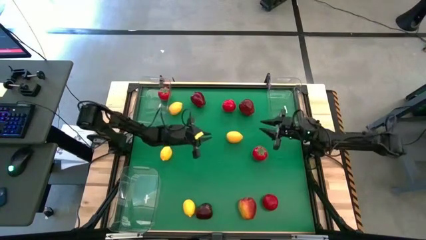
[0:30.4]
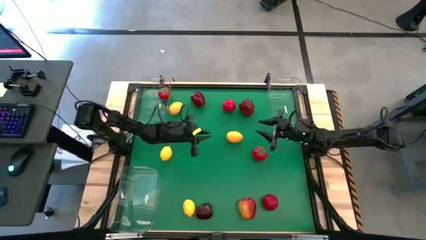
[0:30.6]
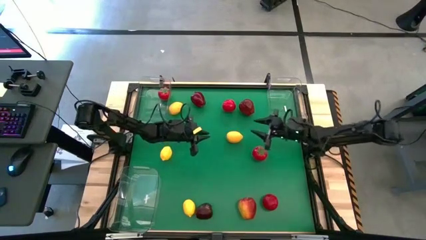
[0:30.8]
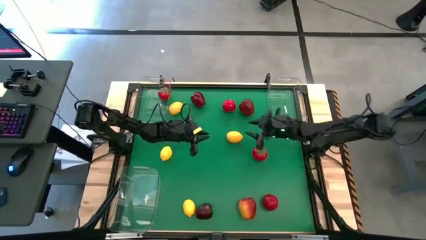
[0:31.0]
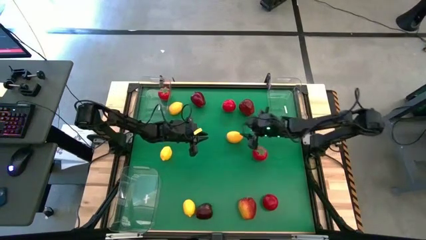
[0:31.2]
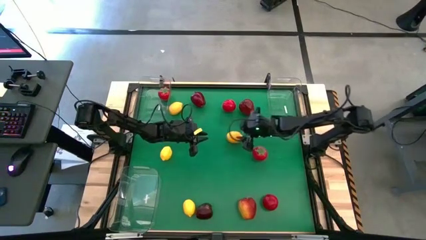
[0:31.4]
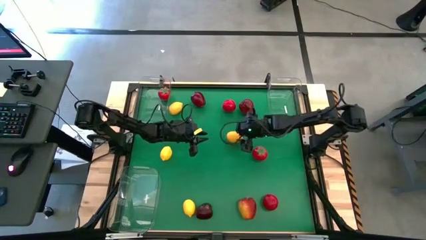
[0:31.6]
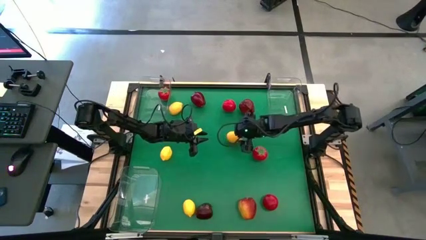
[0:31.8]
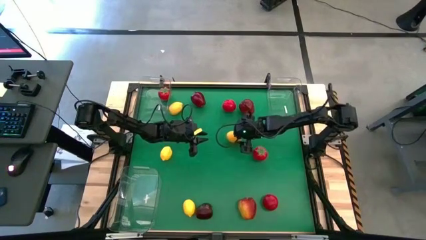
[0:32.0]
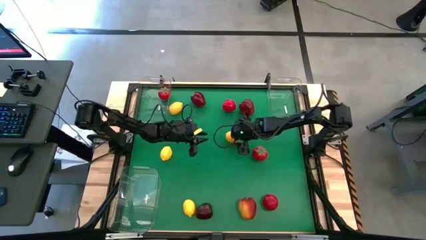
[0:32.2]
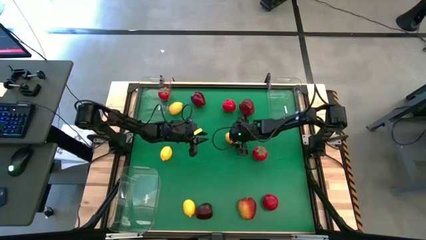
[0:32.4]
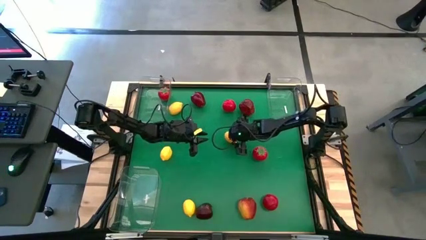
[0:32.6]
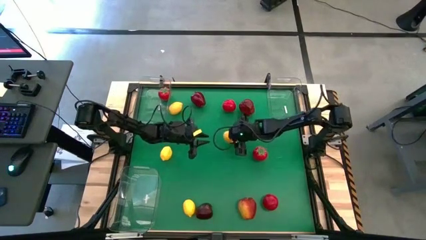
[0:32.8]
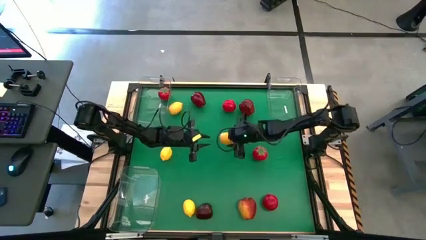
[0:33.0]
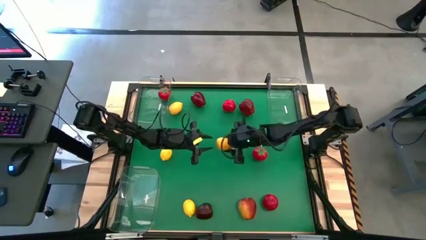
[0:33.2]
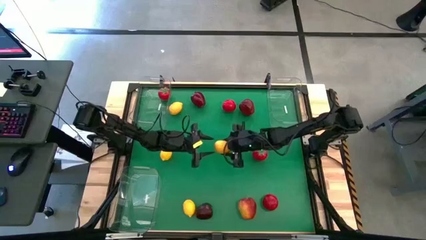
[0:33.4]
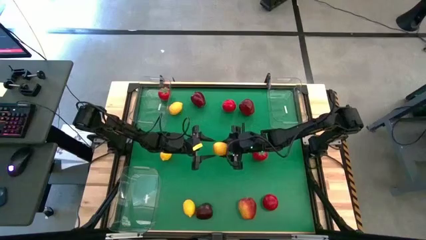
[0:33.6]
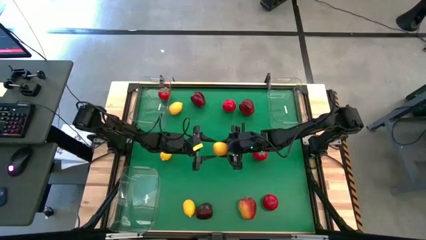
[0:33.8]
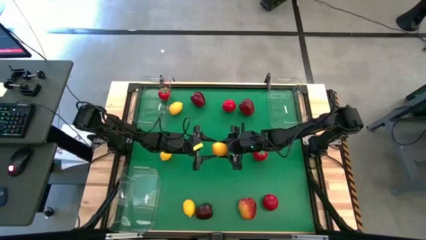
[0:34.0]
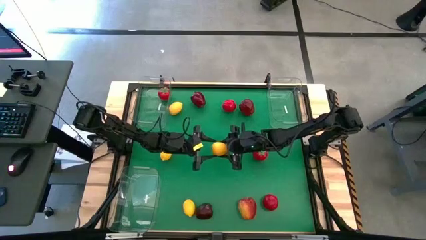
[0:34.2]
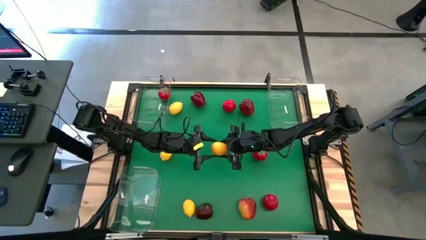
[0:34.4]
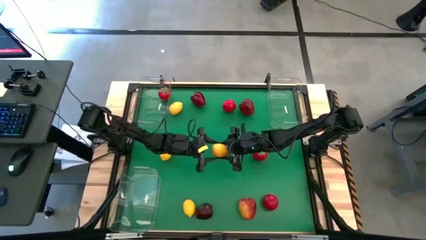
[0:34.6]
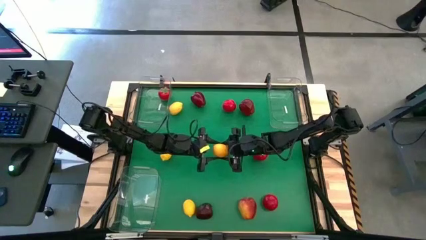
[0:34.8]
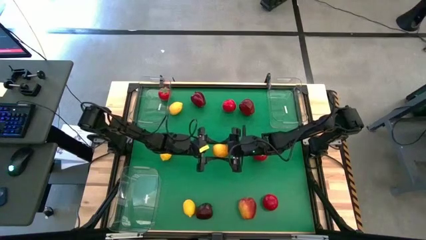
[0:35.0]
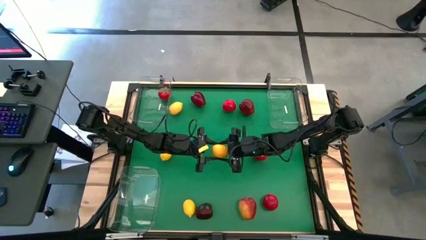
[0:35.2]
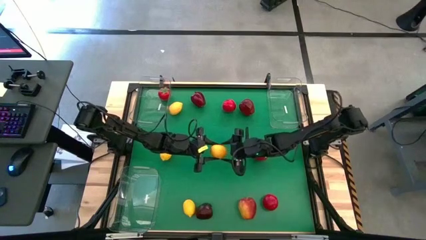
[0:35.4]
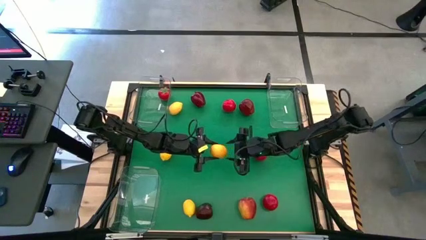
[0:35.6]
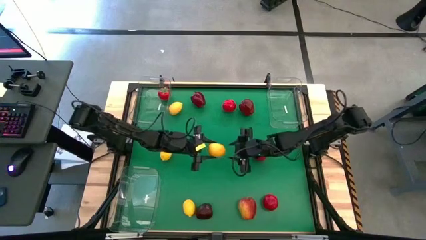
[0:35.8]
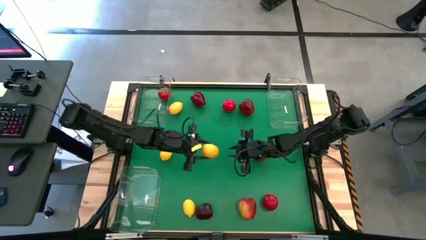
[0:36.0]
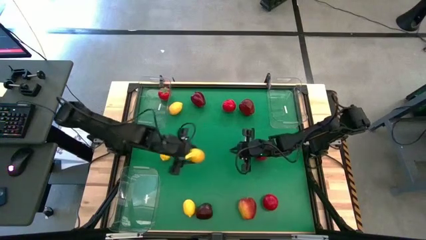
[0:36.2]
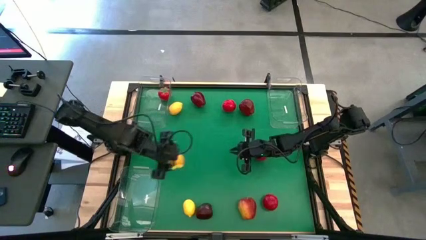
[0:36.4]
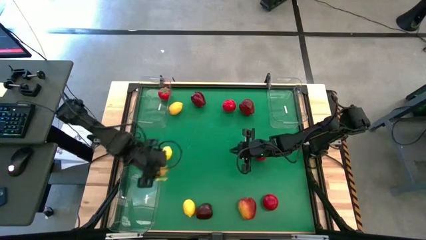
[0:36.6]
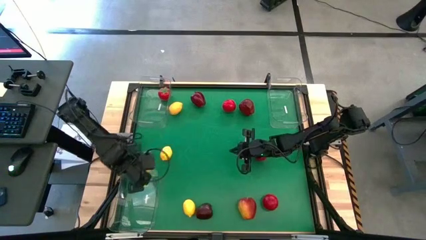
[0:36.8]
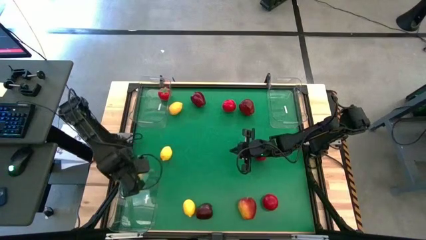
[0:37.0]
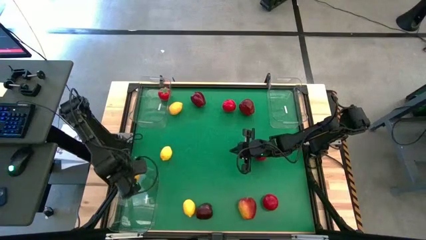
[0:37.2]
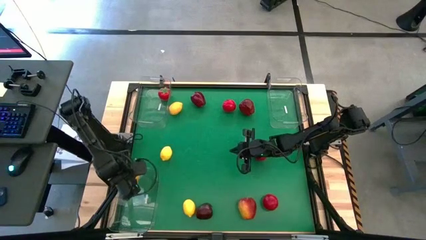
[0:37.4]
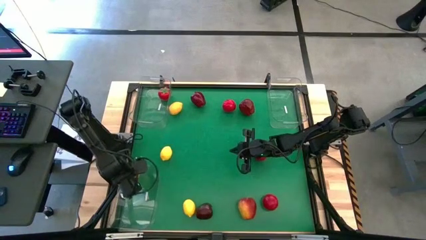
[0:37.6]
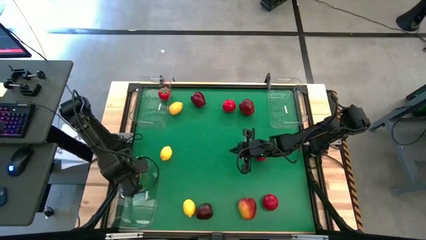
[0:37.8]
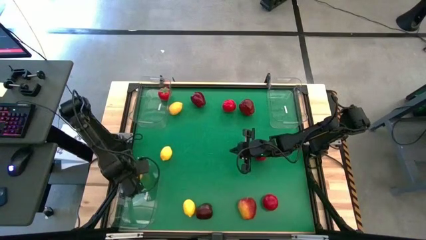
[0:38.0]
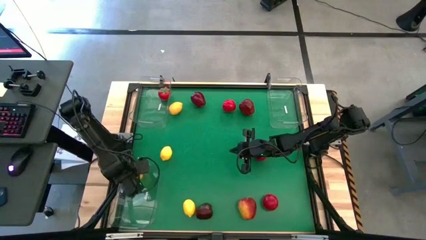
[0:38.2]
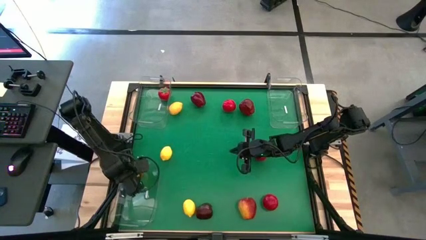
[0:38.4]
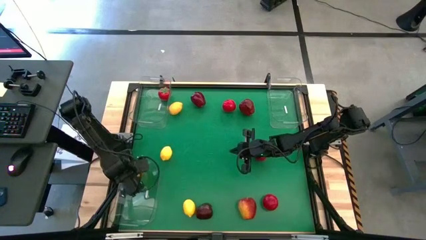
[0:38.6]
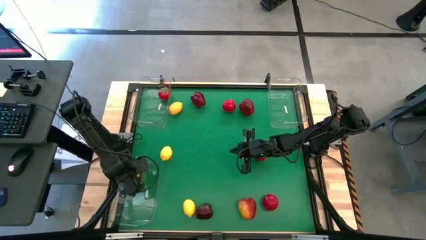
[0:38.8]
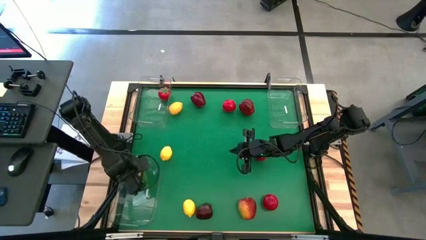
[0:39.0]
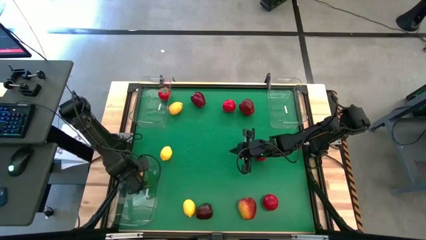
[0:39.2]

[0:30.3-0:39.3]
Task: Sort produce into baskets
Put the lemon into the bottom bin

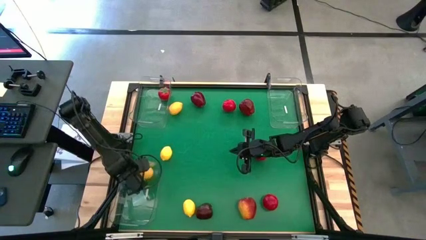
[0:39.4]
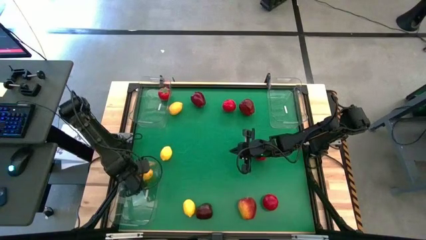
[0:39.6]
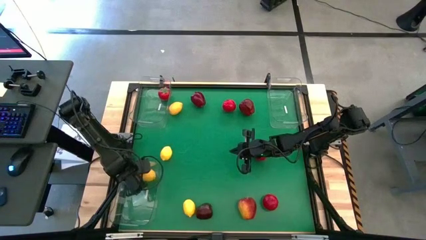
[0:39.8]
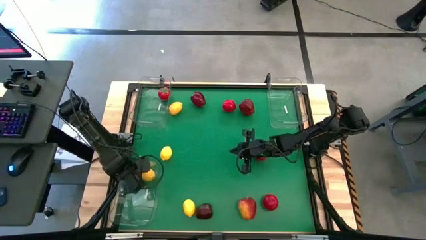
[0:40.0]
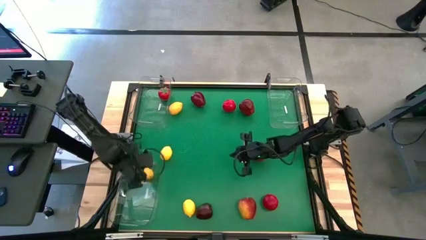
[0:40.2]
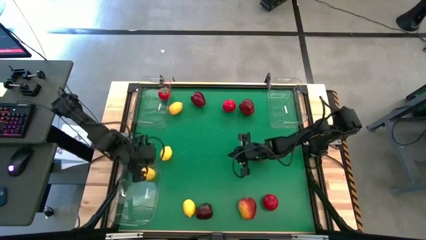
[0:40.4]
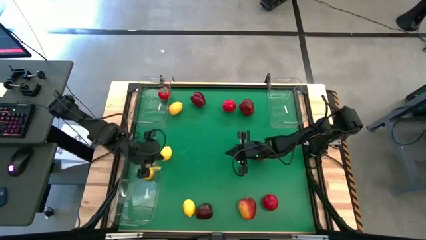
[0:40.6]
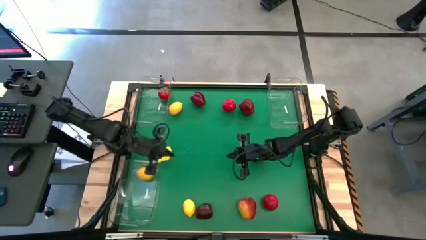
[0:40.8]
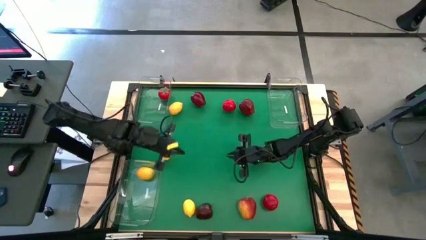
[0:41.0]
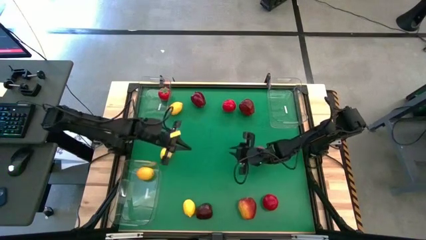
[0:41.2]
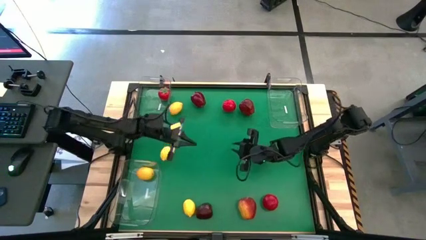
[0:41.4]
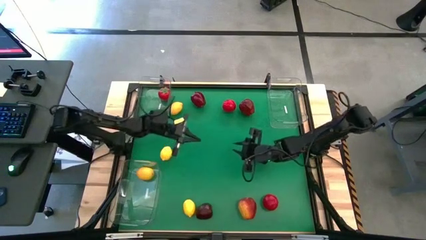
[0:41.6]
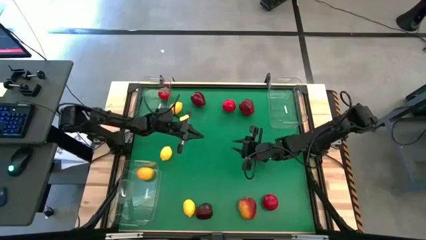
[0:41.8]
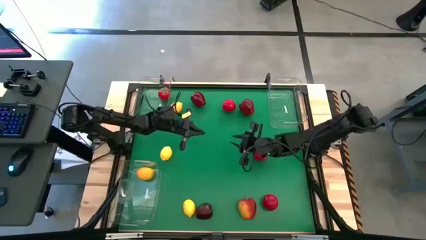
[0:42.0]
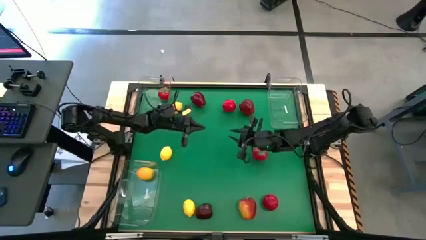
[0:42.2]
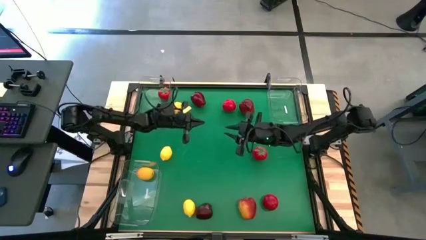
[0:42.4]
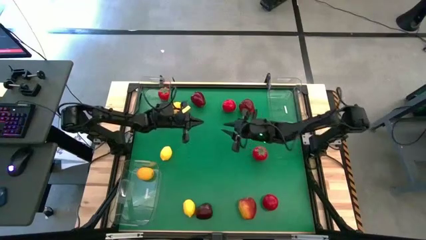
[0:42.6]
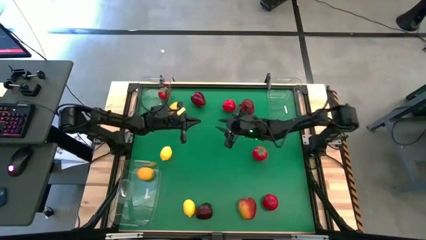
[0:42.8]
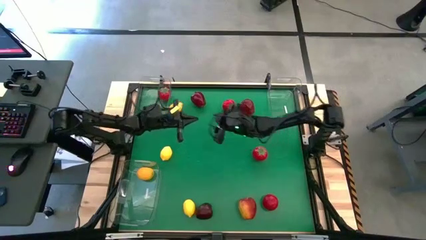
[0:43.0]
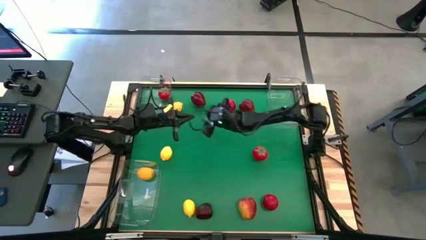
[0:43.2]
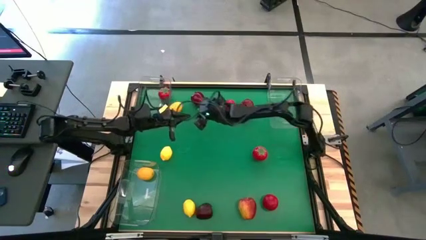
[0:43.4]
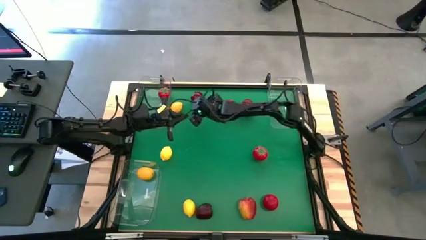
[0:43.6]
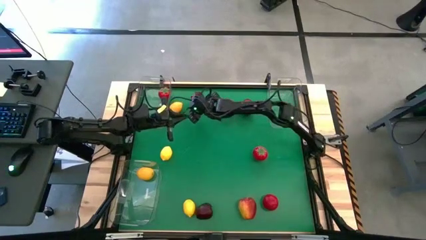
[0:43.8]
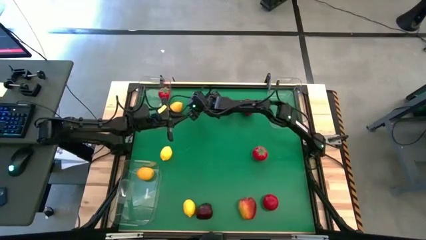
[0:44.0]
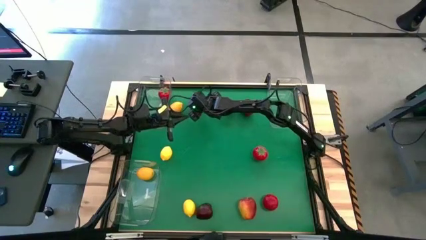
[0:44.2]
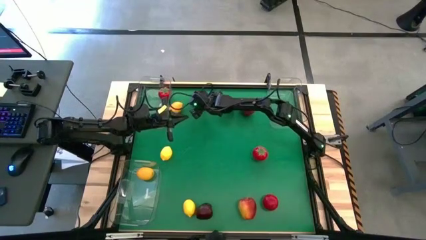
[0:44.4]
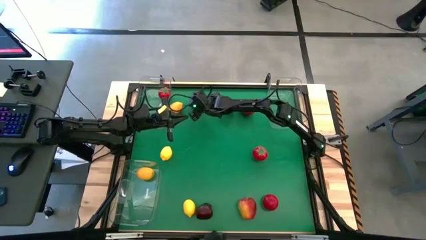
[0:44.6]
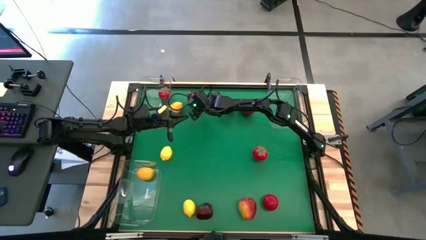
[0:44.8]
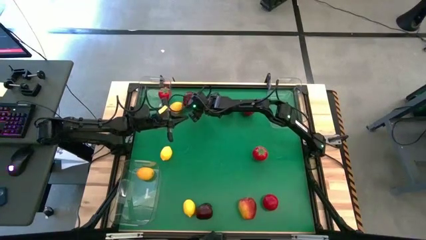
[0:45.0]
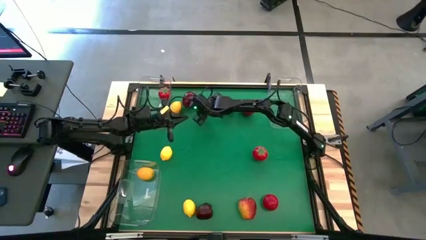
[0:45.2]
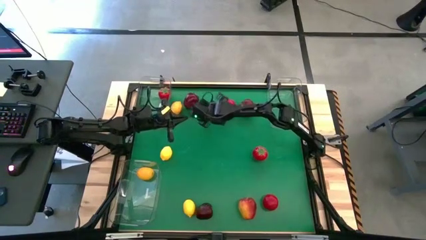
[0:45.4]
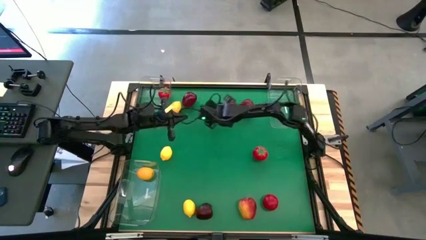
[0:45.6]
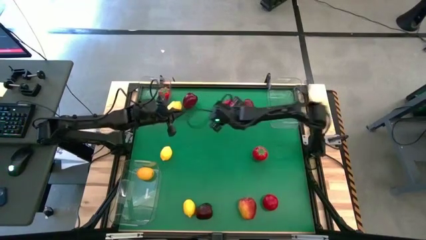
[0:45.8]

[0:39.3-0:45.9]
Put the apple into the top right bin

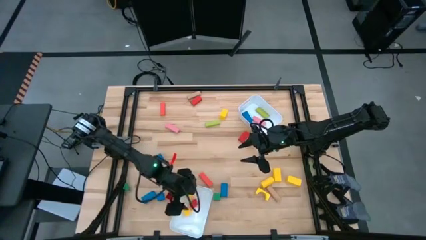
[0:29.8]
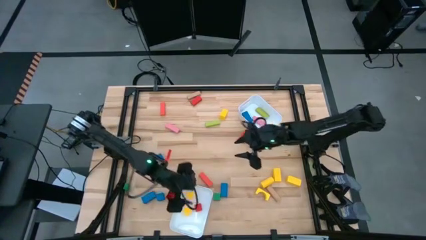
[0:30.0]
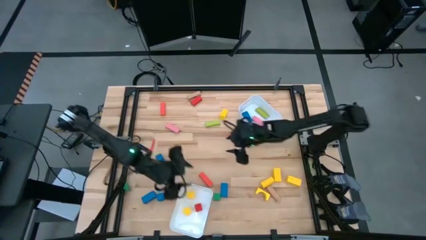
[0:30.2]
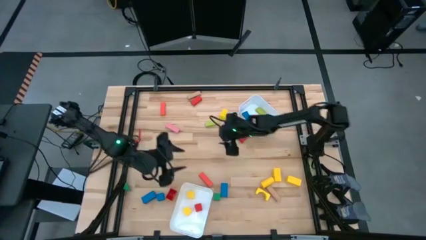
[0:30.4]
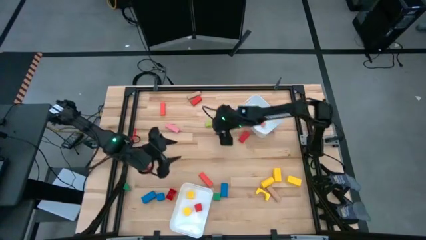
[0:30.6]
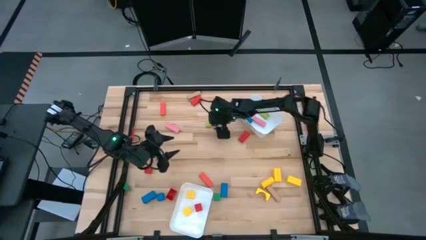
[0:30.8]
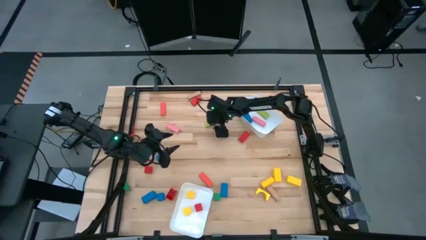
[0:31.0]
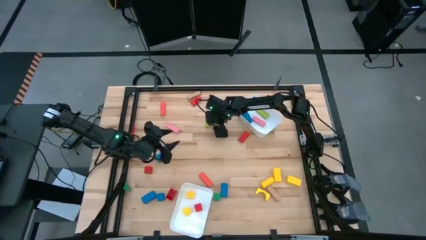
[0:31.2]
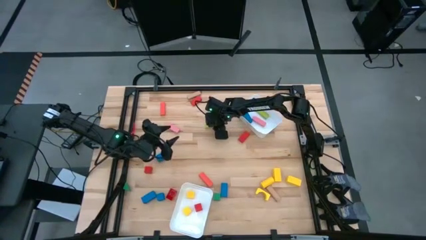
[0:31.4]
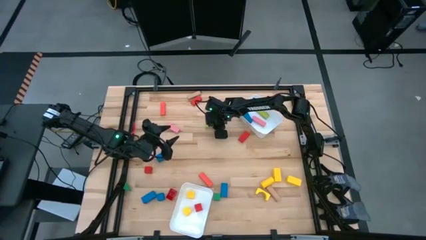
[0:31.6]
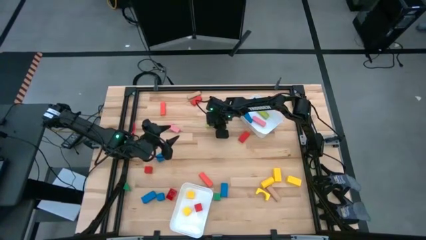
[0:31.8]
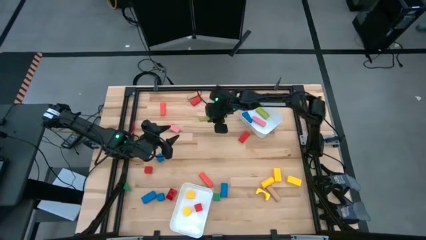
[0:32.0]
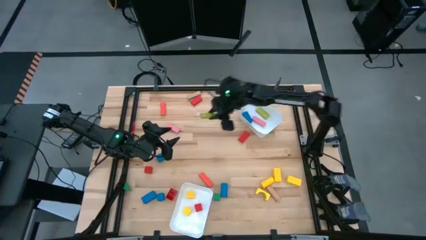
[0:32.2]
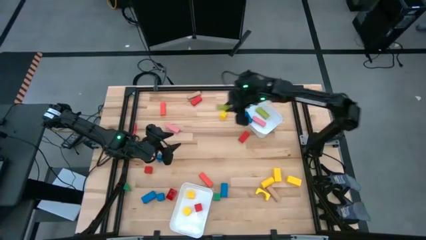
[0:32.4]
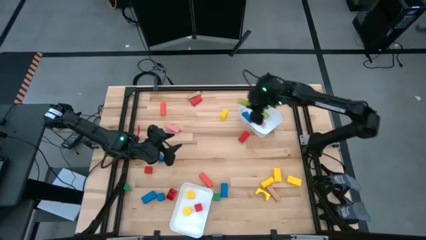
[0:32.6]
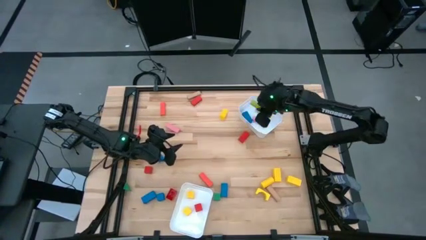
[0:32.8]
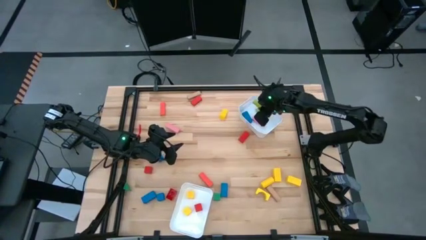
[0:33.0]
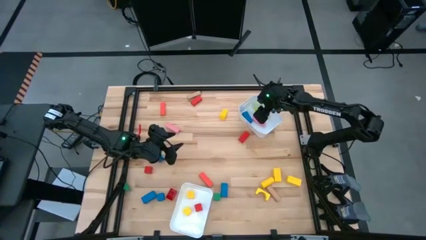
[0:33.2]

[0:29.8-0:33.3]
Task: Sort blocks by size
Put the green rectangle block into the top white bin
